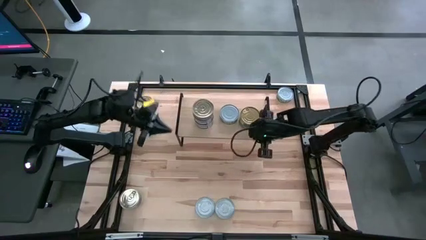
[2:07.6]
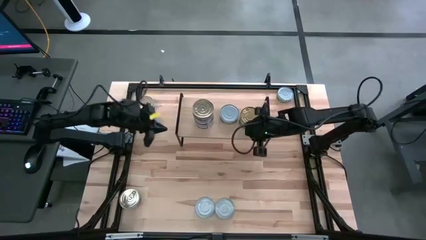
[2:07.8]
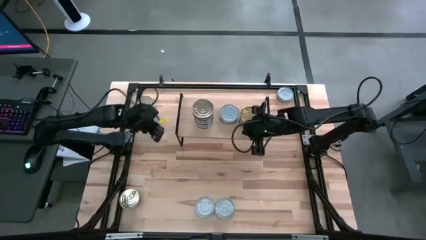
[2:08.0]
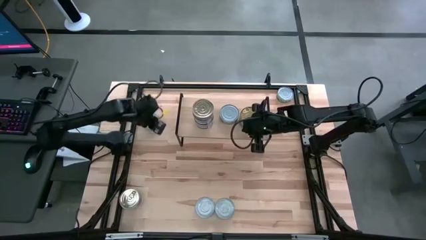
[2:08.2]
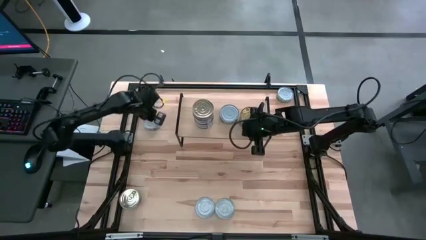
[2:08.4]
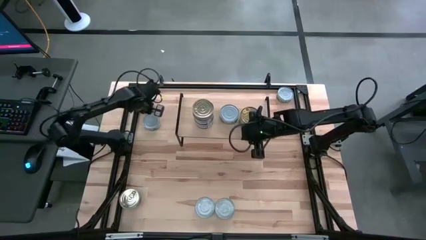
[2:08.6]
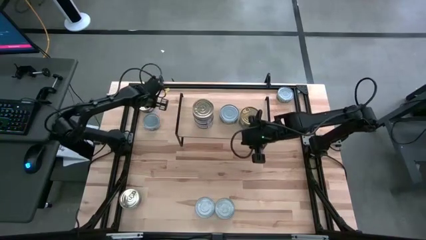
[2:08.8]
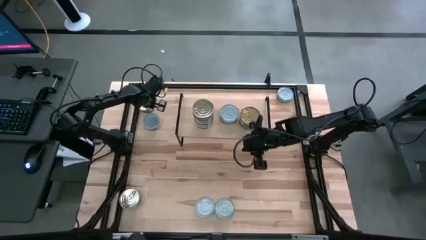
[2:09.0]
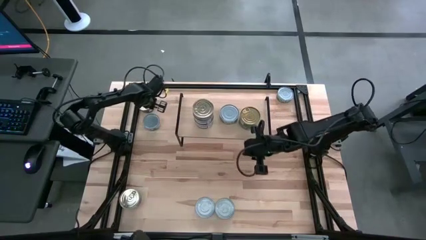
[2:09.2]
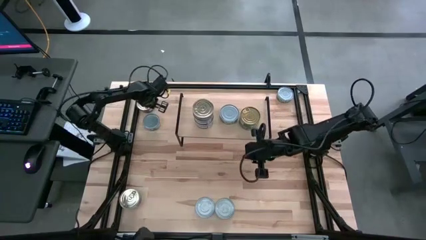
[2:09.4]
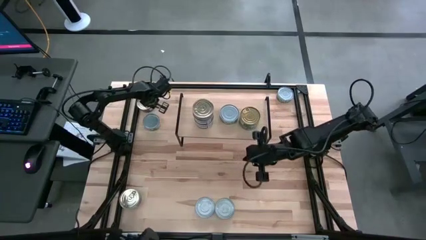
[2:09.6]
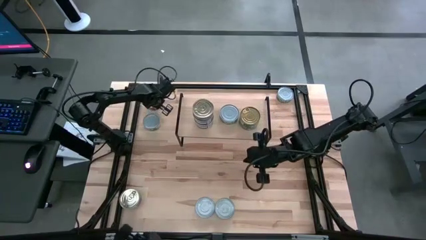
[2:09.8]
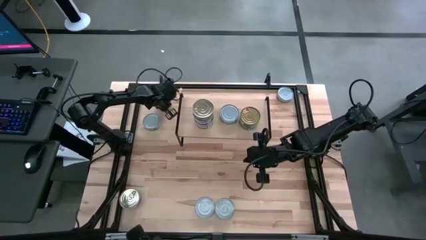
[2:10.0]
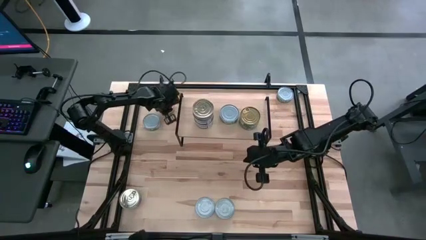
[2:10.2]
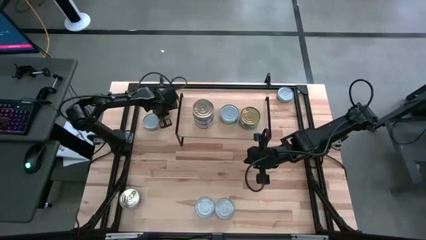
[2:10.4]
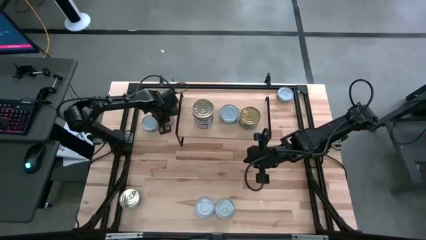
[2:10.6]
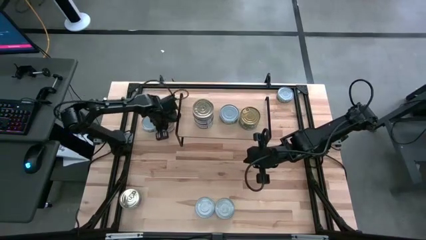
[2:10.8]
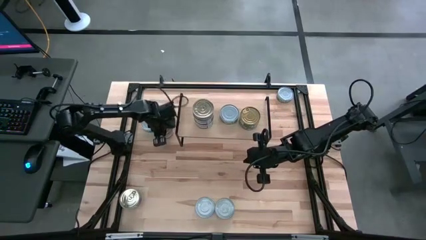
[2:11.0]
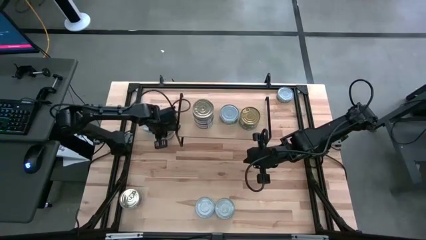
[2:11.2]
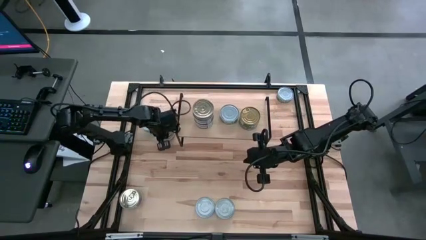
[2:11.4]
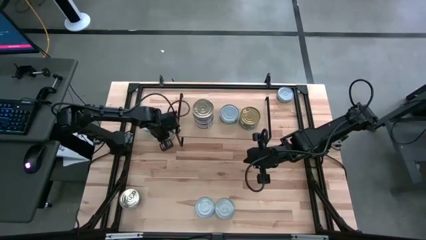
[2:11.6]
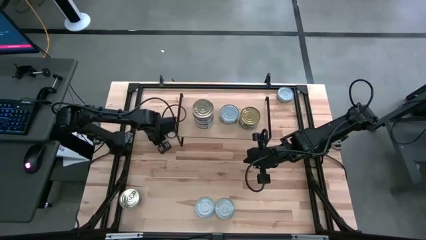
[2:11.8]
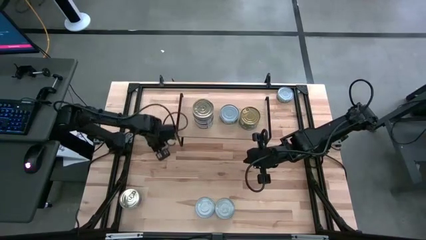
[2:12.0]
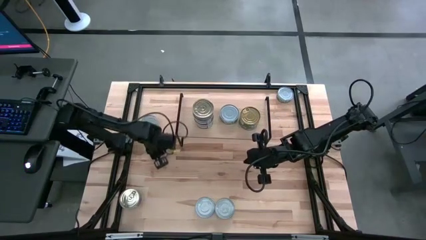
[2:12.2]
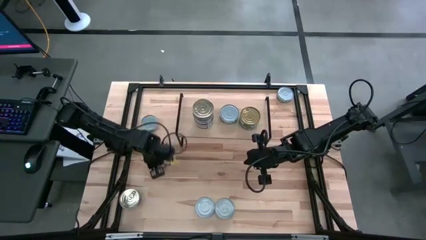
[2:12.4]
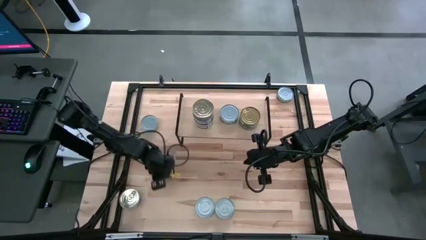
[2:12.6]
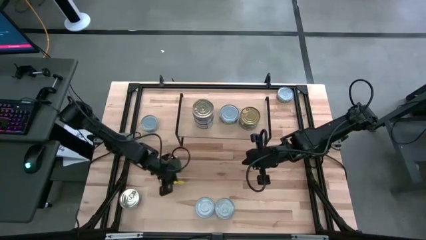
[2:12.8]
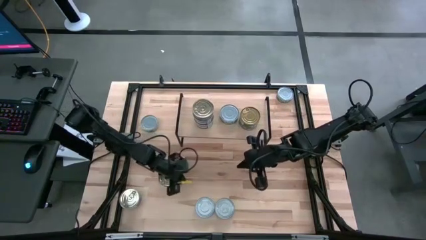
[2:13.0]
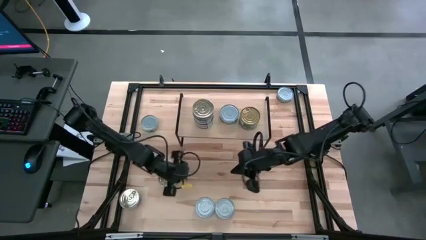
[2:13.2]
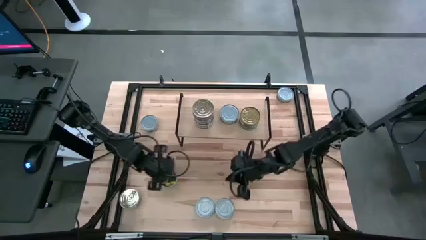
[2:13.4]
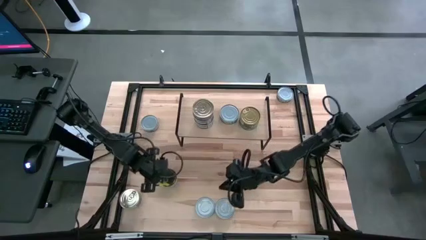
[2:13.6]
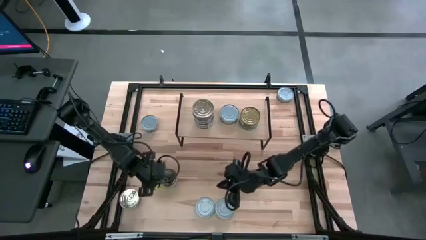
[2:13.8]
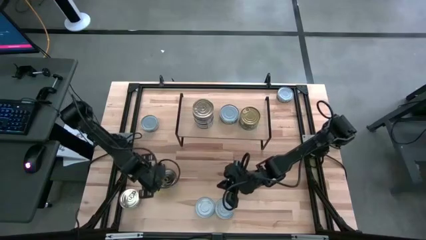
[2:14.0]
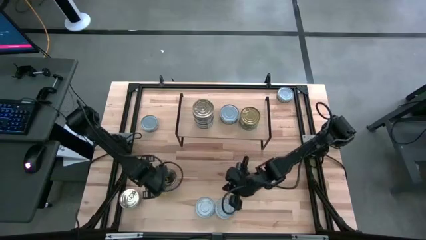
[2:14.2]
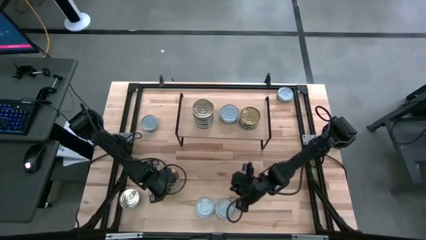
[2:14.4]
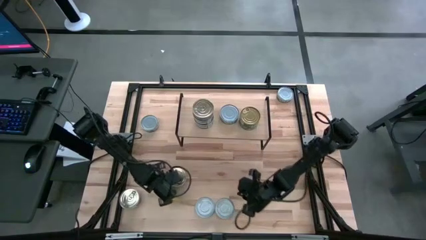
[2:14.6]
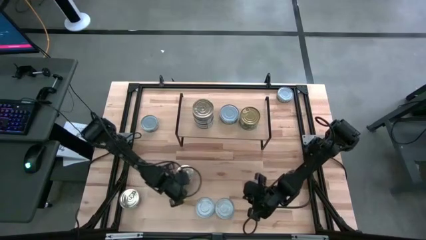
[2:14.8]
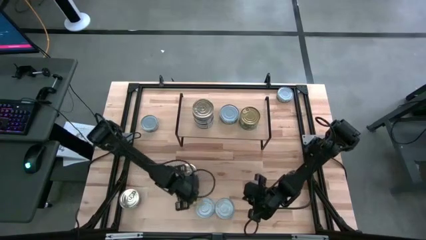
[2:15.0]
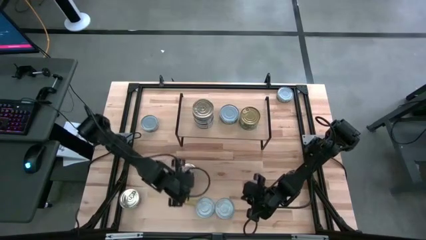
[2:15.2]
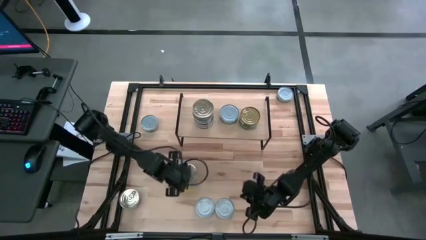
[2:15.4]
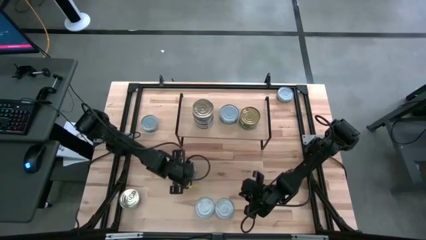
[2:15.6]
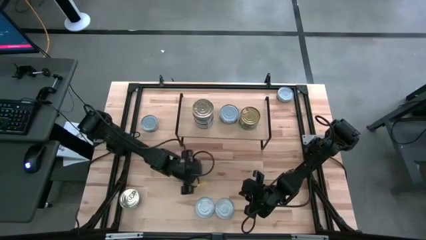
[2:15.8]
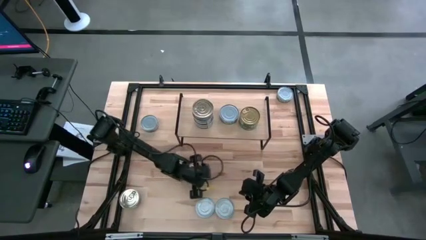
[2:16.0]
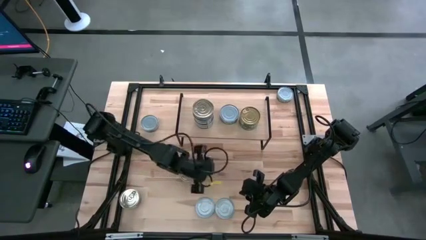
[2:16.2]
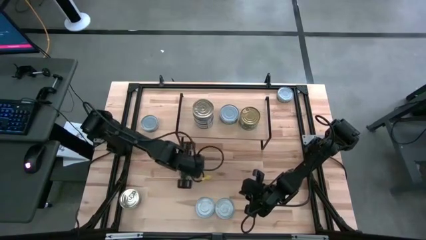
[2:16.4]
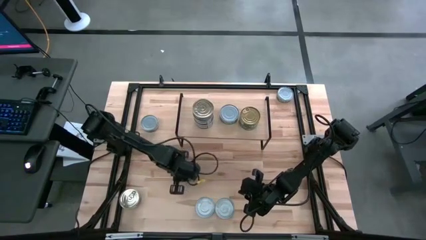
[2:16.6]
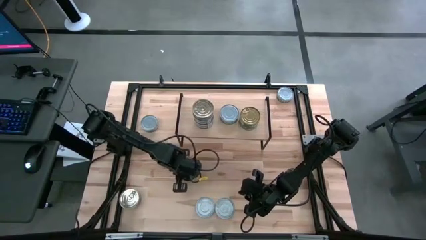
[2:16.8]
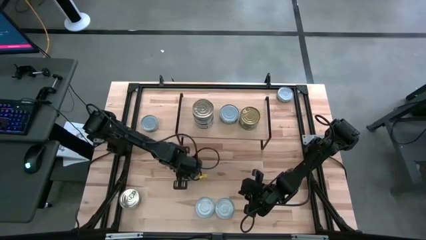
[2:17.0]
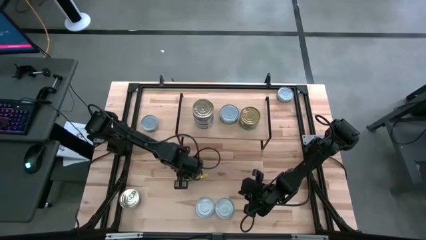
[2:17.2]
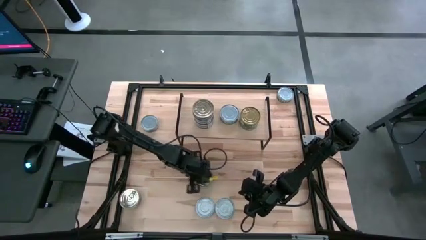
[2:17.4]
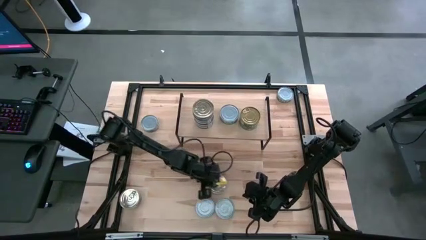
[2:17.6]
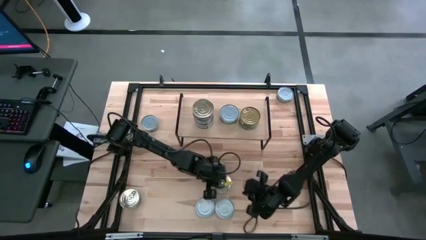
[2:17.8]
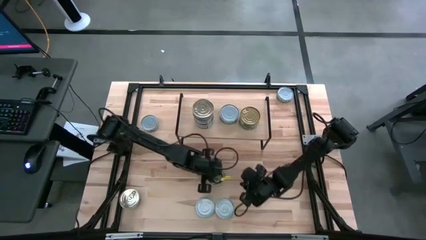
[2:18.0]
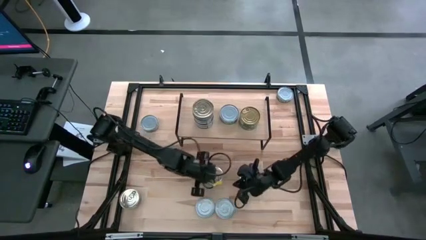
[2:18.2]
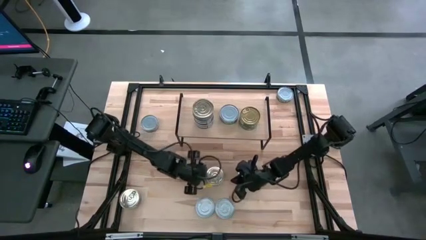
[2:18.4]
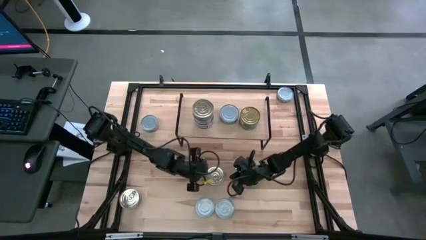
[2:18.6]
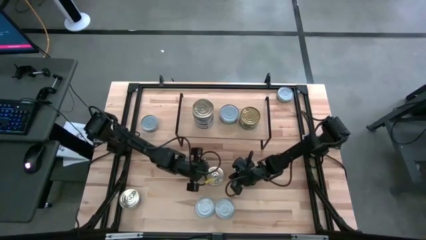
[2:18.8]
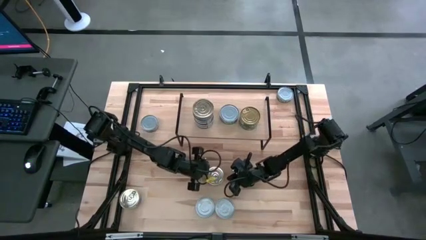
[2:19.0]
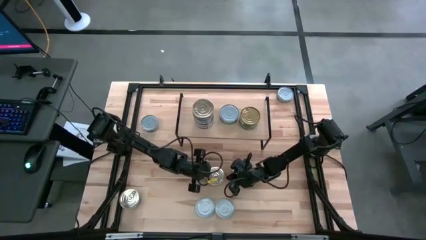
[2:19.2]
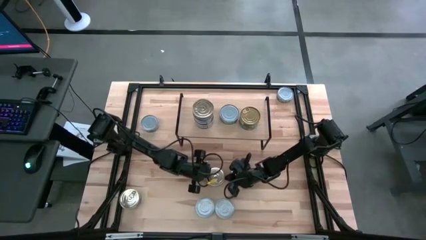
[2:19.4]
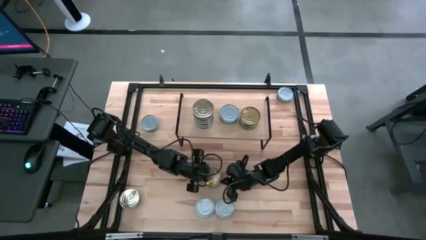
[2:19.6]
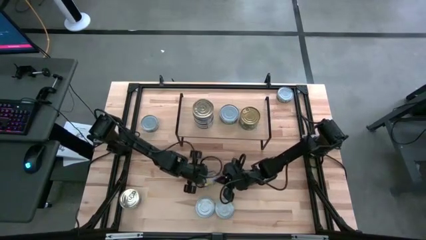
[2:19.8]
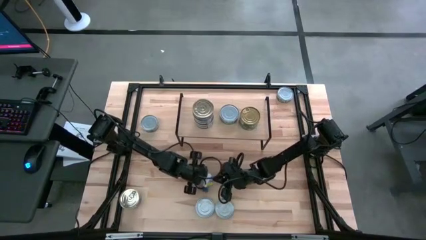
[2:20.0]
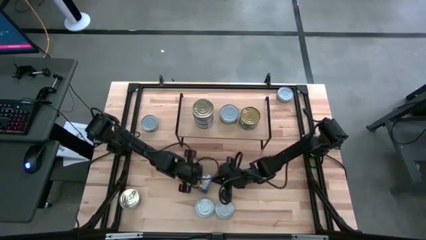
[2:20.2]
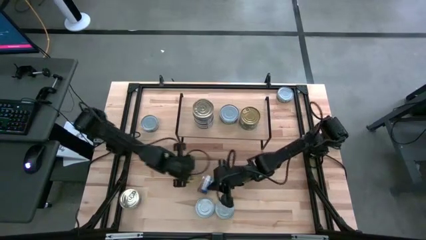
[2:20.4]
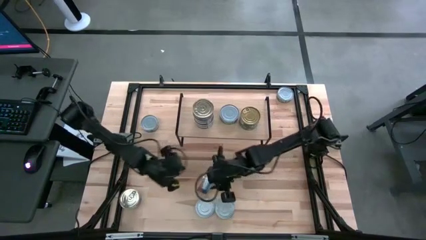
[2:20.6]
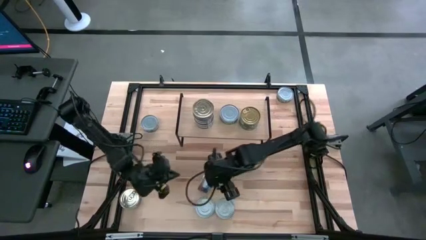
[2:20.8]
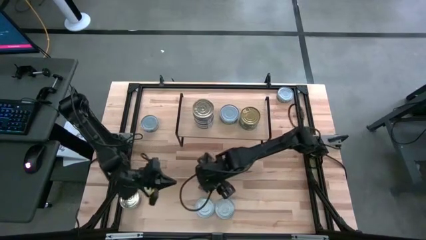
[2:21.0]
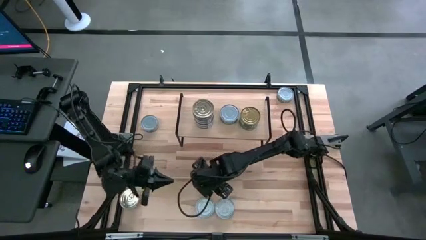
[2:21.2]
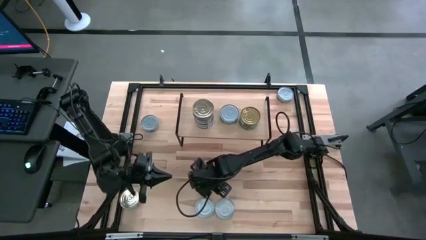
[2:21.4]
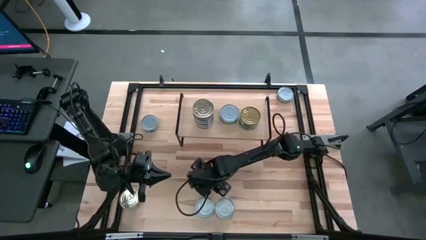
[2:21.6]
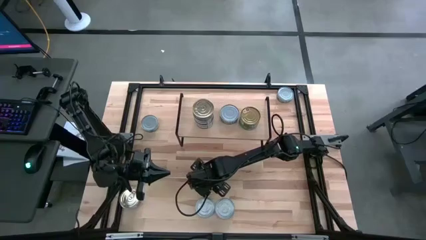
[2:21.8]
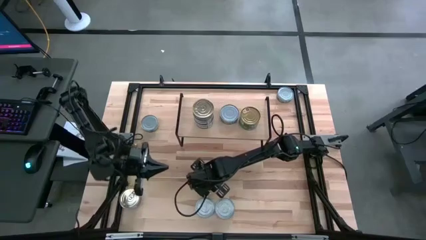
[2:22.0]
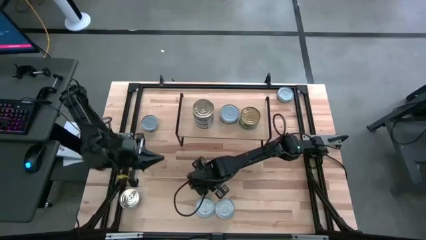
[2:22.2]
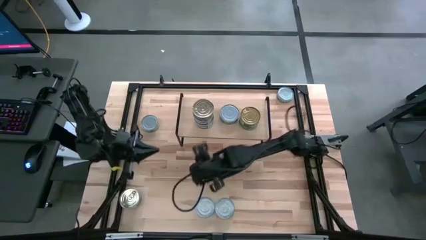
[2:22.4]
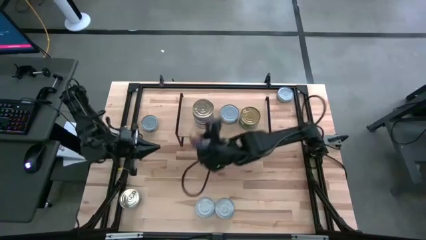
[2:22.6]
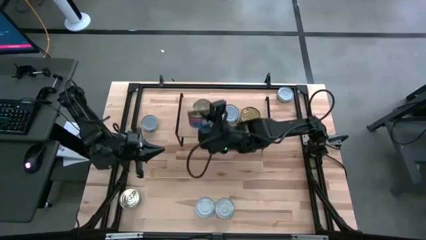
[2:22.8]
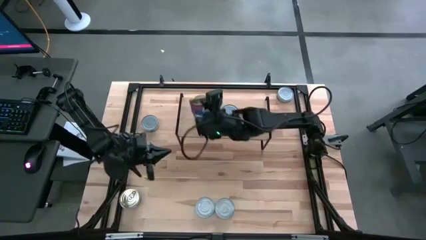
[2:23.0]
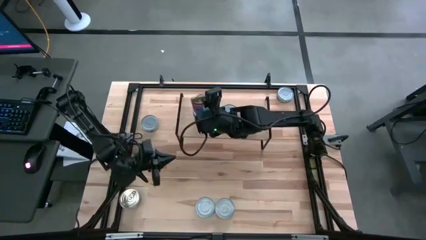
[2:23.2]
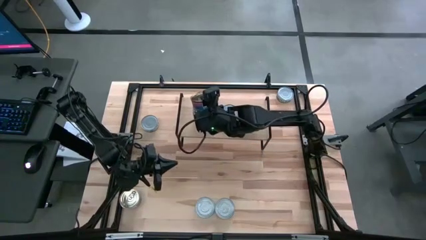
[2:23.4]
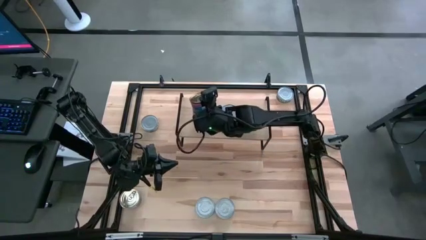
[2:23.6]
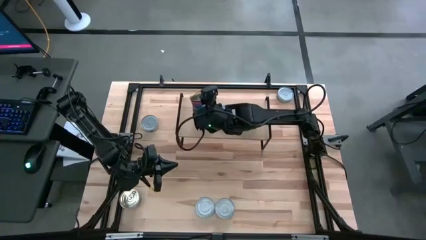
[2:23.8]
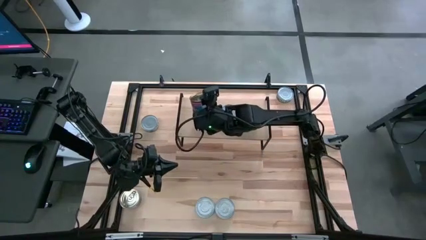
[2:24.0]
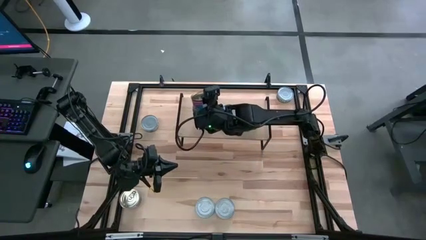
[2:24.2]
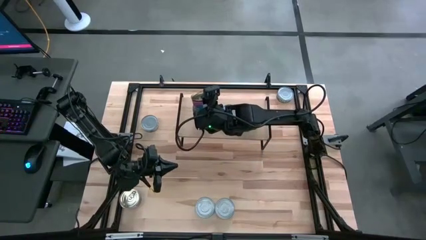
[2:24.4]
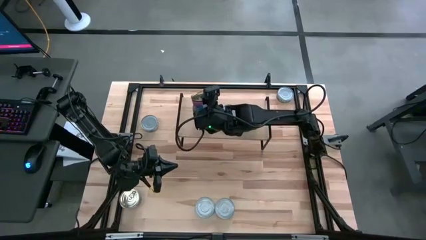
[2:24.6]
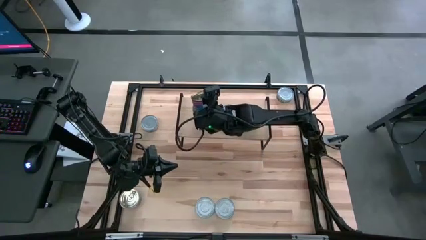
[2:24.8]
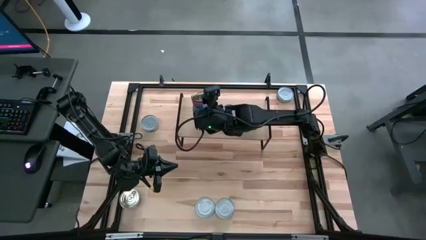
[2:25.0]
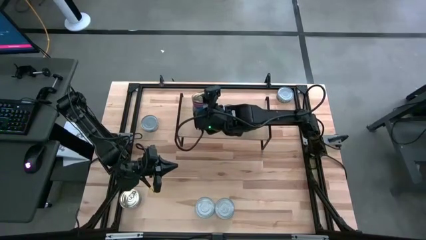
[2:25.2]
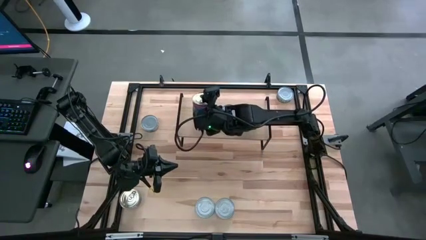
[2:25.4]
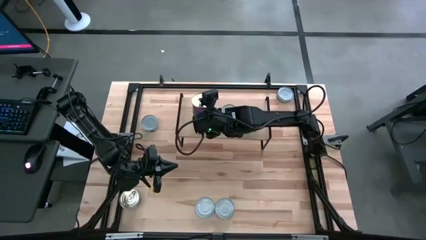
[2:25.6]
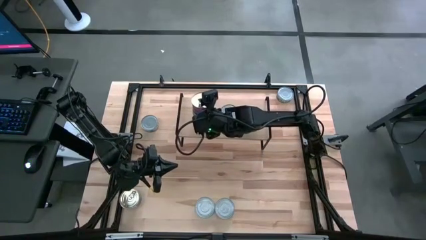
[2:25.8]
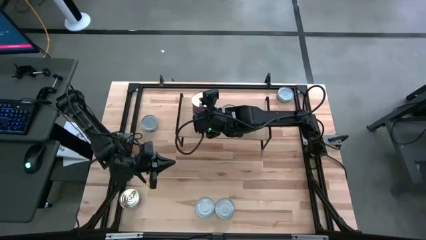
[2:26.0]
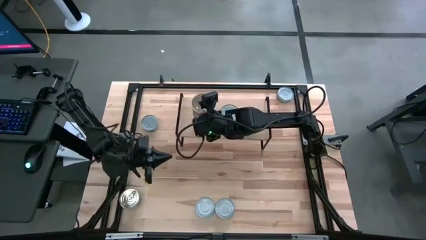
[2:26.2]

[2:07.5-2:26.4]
Task: Stack canned seafood by type on shelf
Stack the blue-pink tuna can on top of the blue-pink tuna can on the shelf
